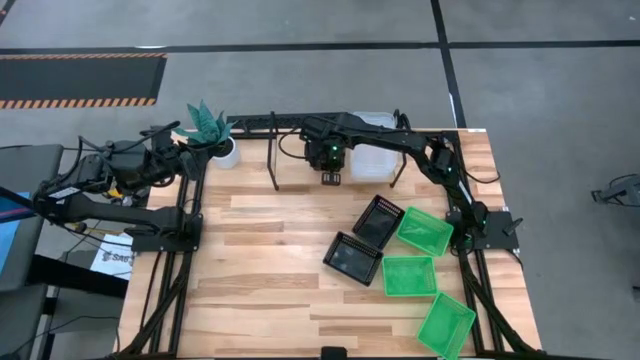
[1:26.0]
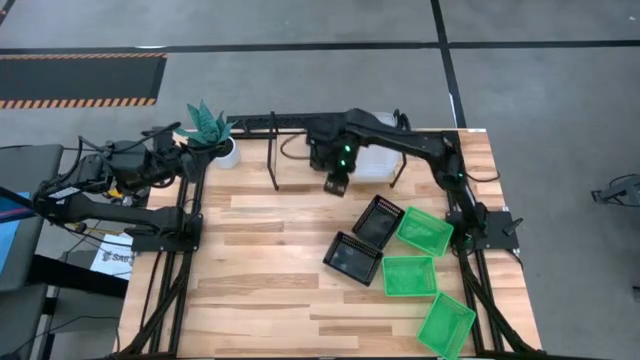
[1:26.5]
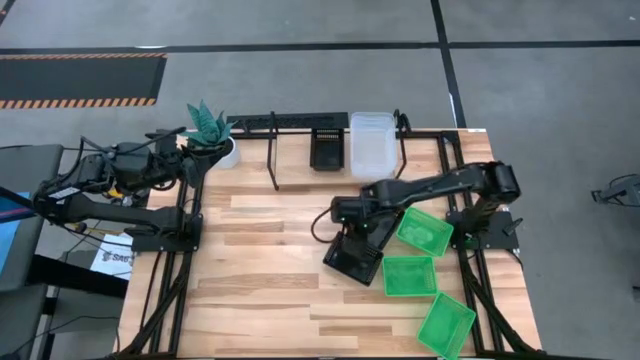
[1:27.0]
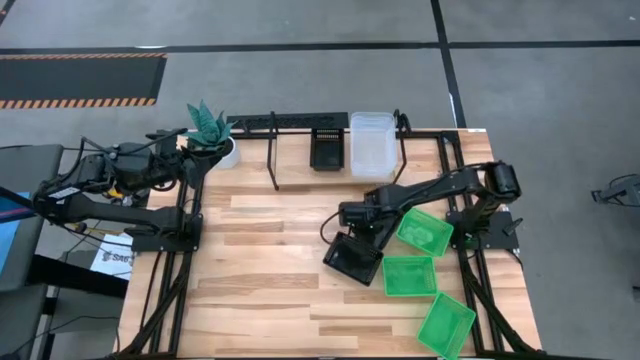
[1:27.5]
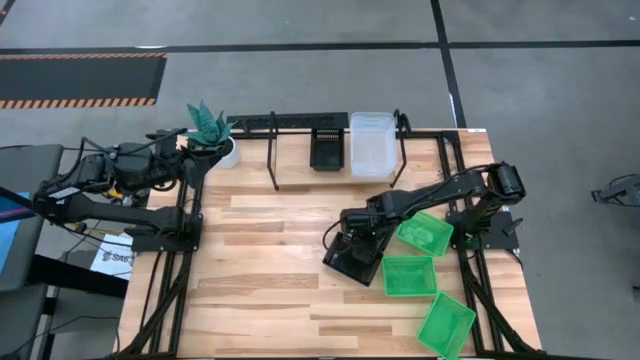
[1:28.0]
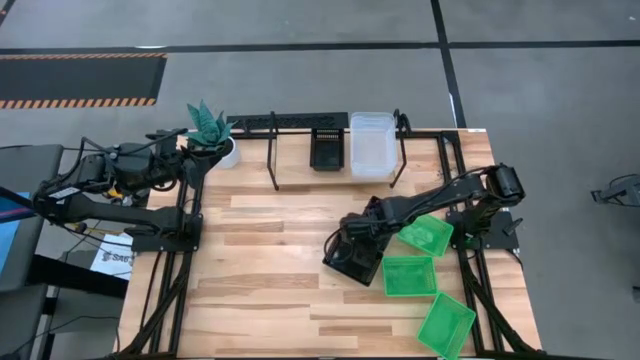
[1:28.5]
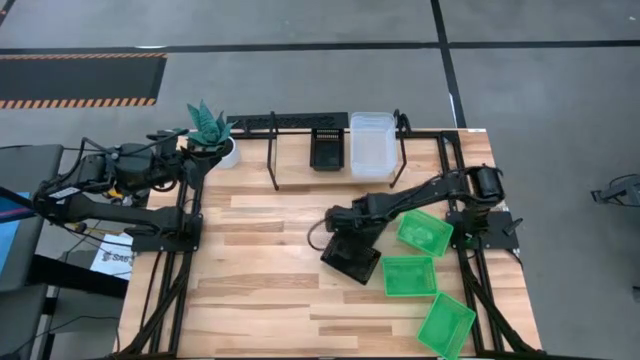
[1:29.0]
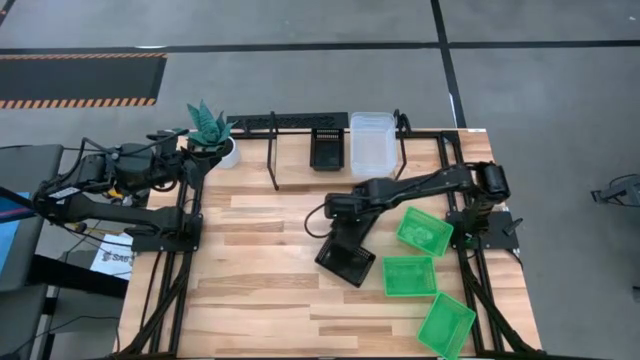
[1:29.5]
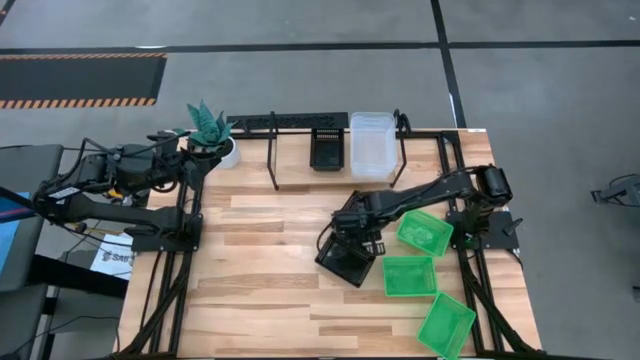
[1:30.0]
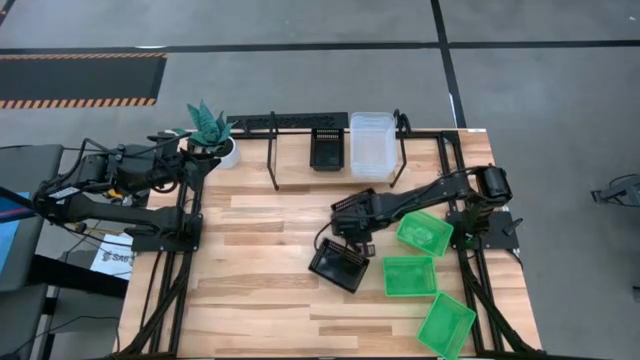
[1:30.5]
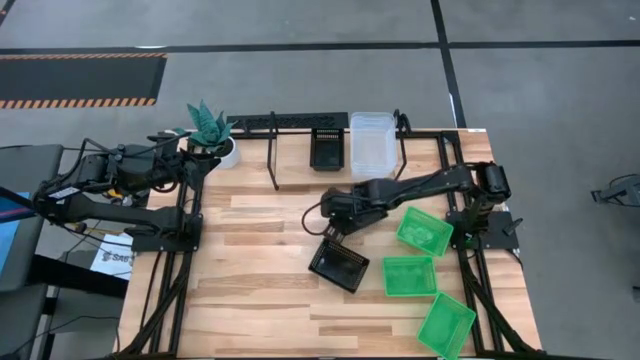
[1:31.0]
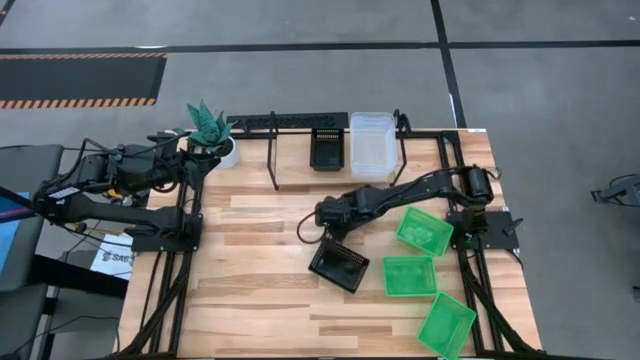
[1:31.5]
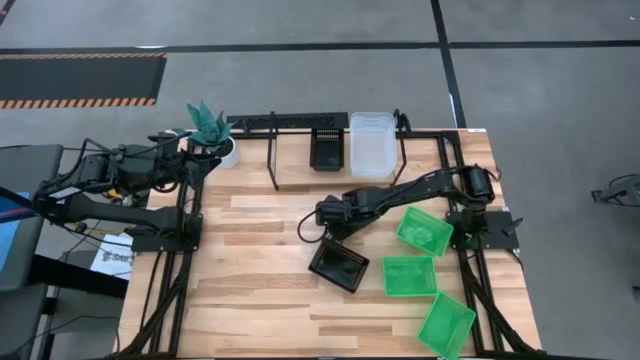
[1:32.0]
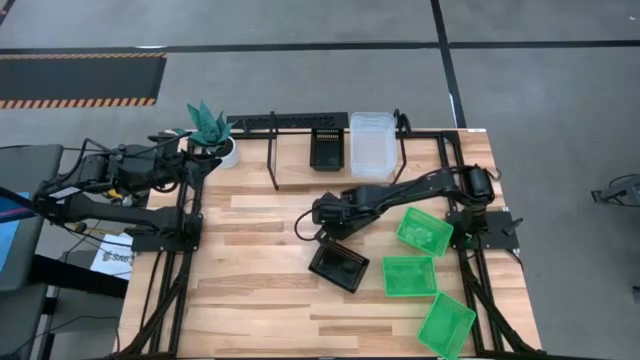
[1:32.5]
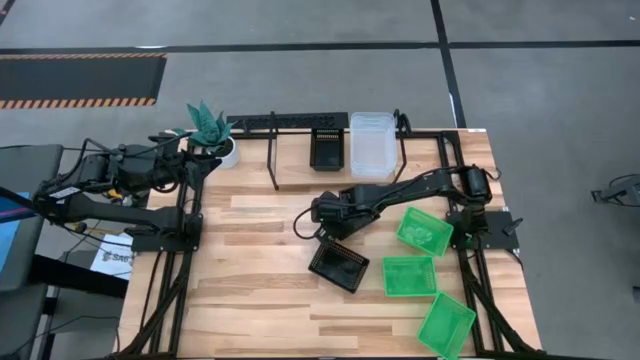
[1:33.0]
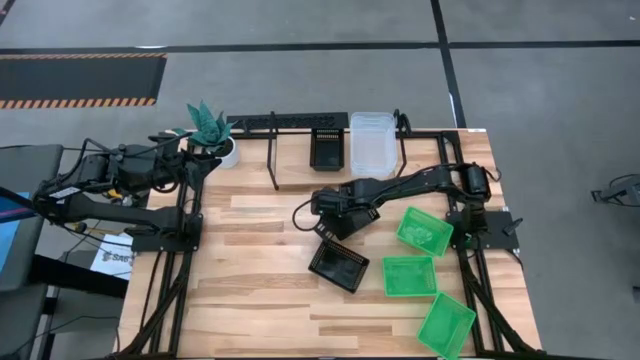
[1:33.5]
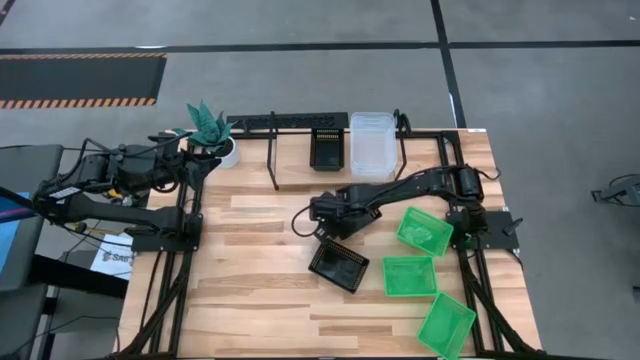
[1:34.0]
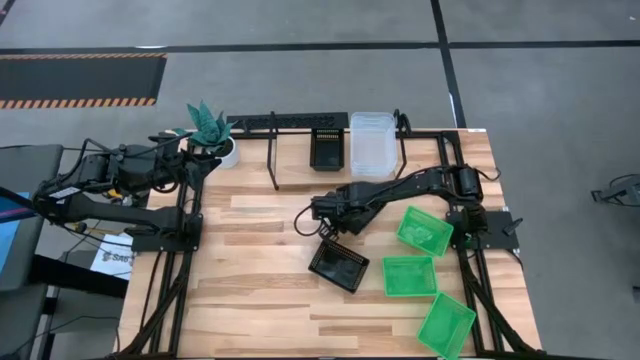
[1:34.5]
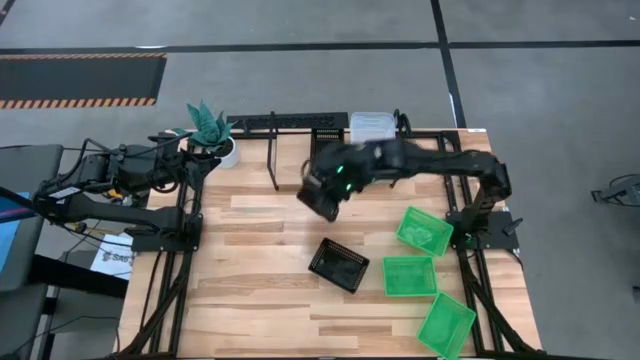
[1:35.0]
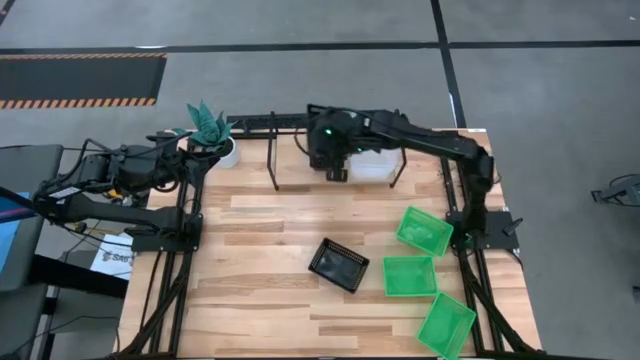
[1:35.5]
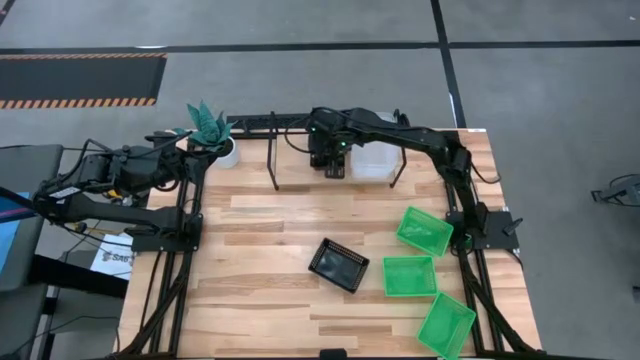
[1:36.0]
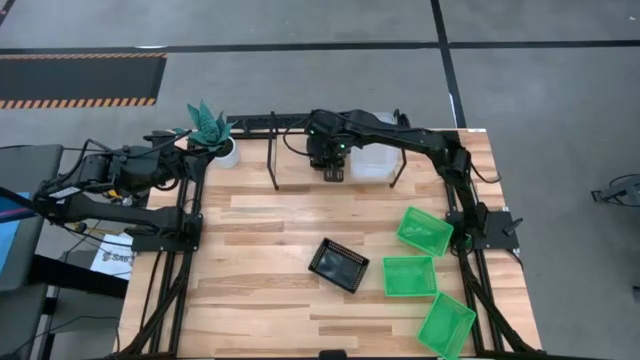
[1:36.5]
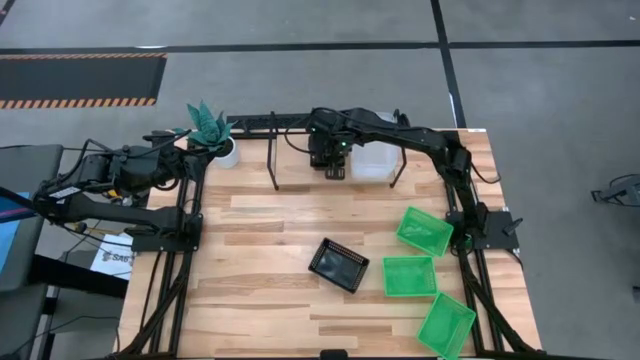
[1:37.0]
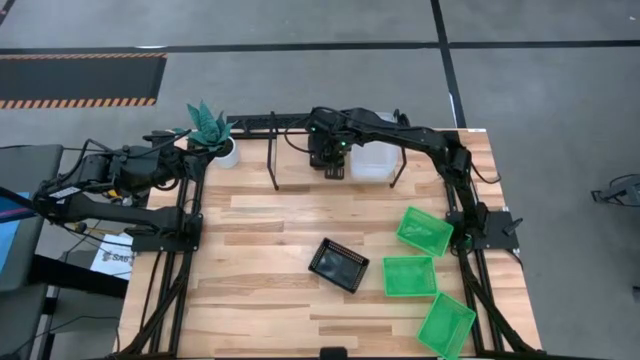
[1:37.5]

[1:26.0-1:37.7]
Task: Stack baskets on shelf by color
Stack the top black bin on top of the black bin on the shelf

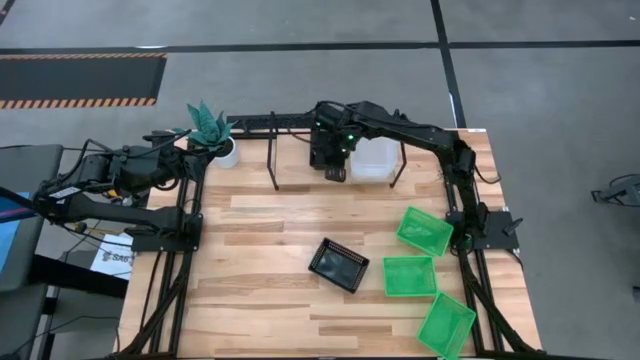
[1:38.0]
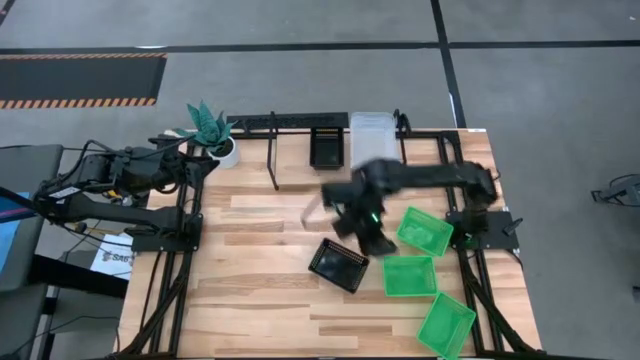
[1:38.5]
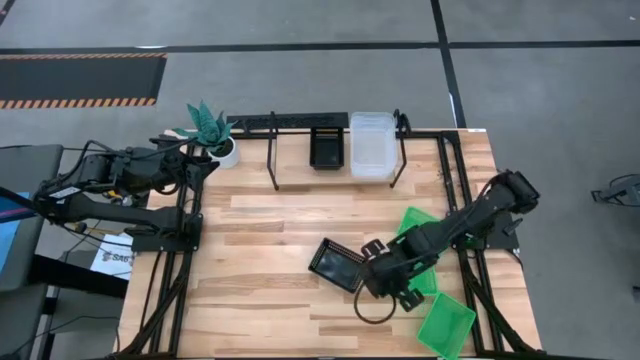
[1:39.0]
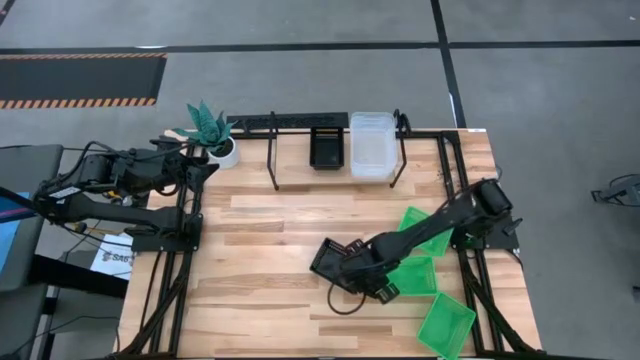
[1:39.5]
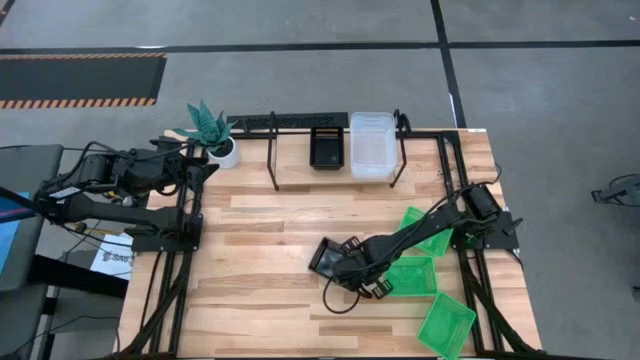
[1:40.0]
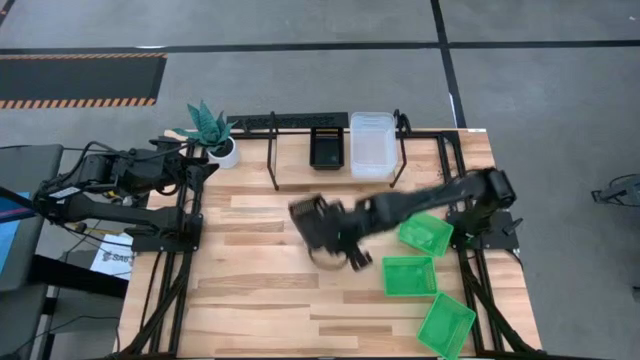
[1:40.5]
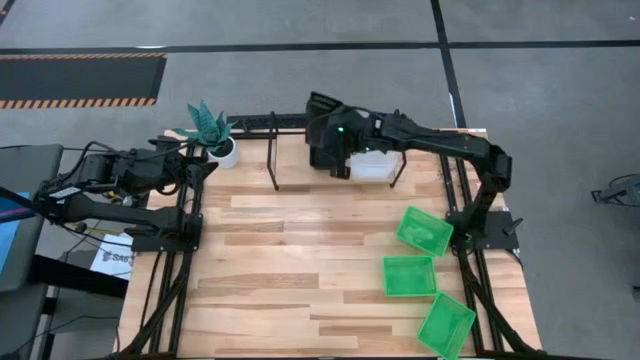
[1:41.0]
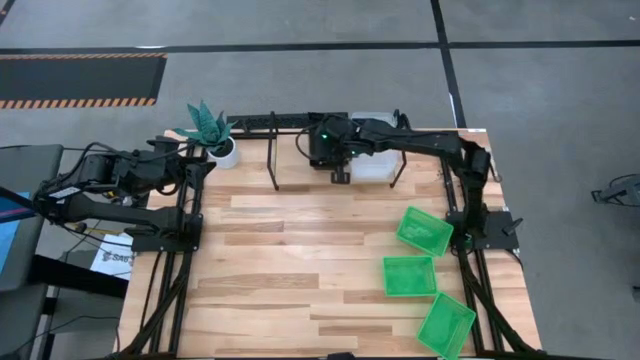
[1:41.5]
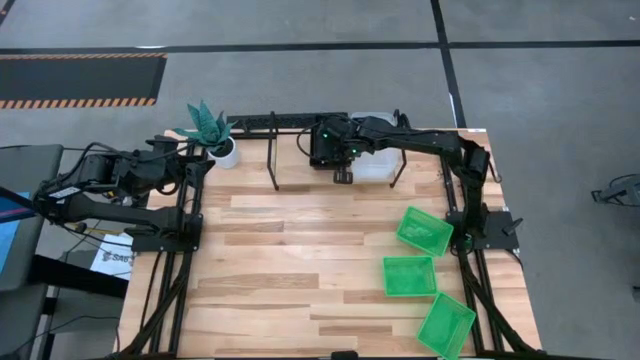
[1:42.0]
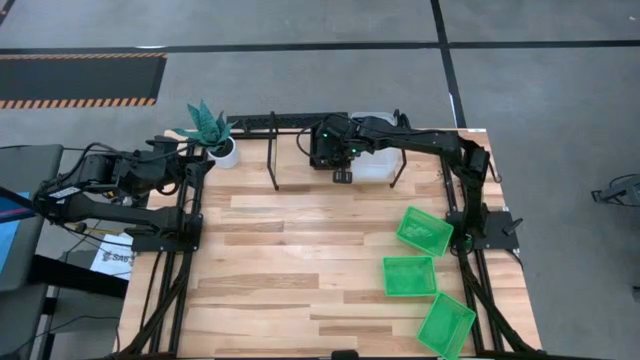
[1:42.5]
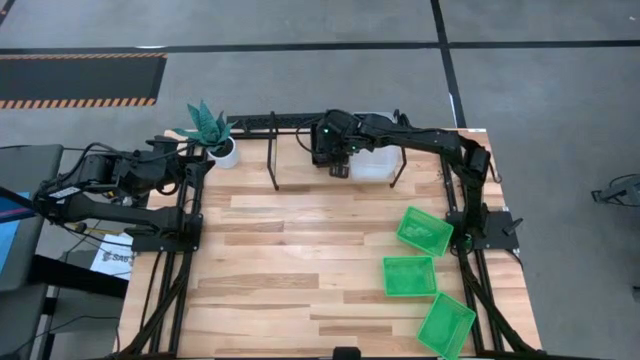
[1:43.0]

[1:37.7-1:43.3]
Stack the black bin on top of the stacked black bins on the shelf

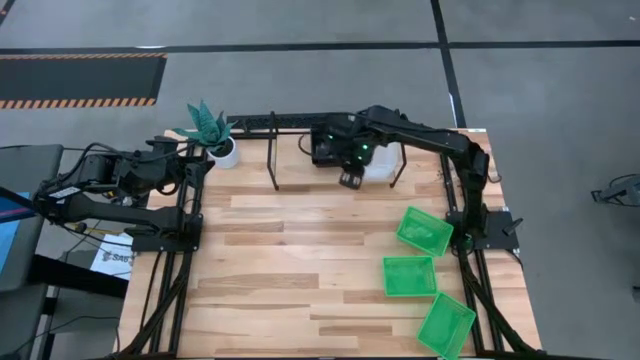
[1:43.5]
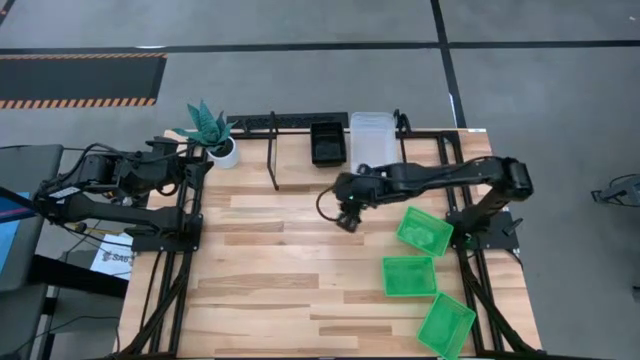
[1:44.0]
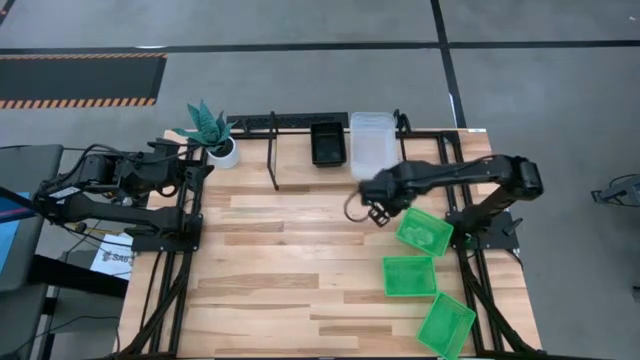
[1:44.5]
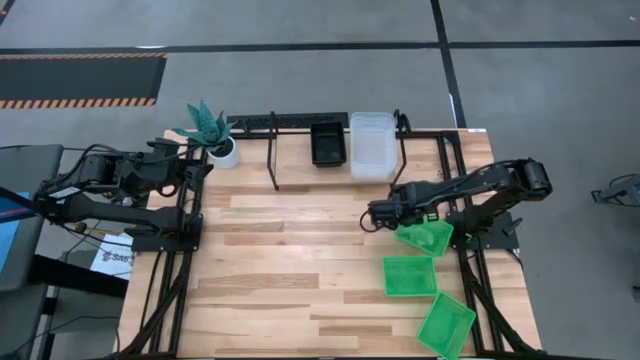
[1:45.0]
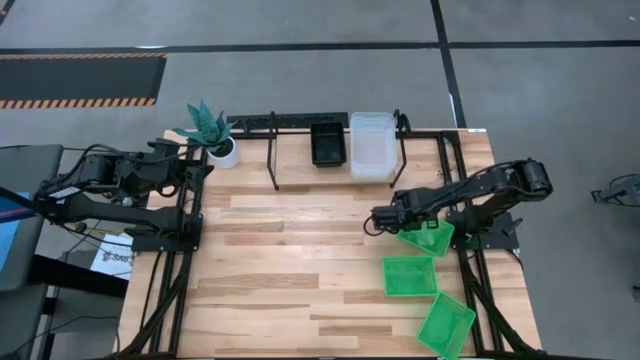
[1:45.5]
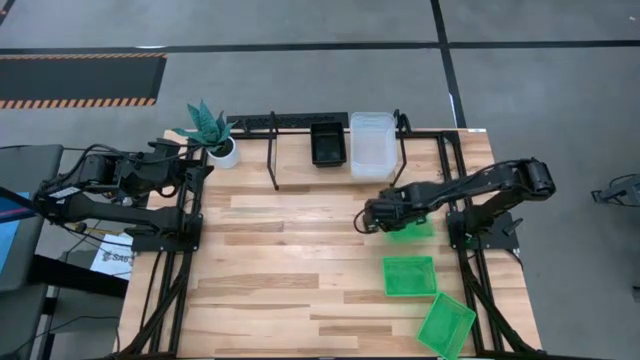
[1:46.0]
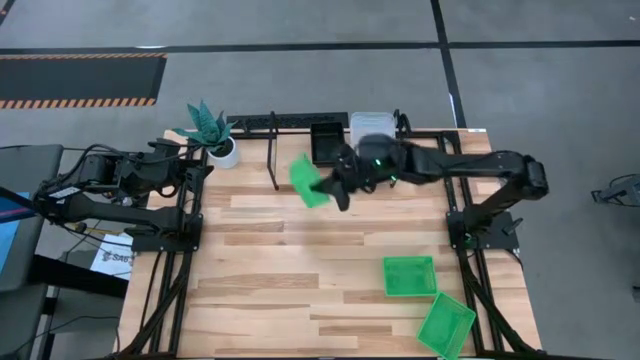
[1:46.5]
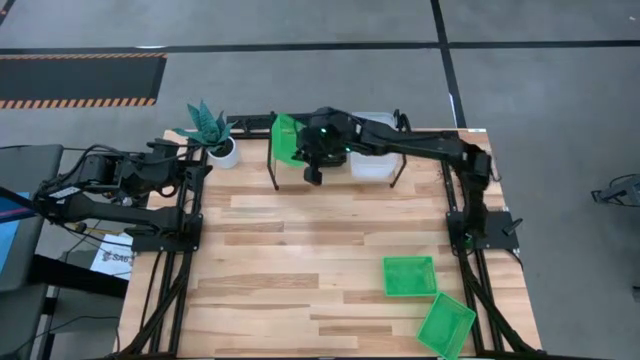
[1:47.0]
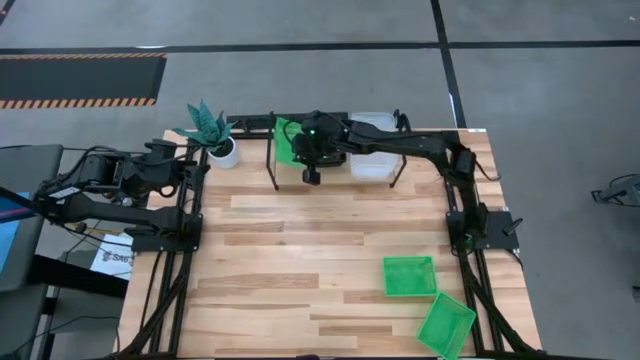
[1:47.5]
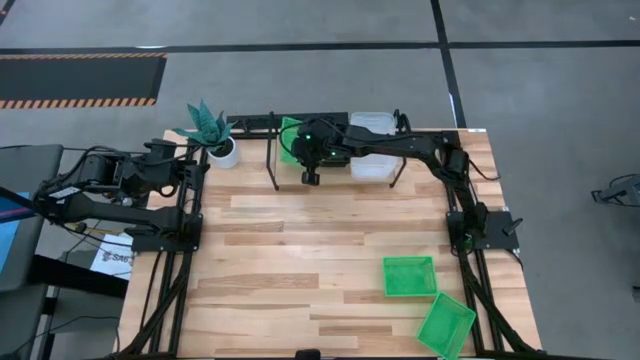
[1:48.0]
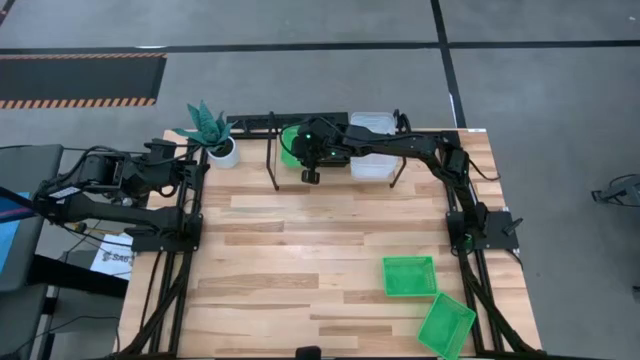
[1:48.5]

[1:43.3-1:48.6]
Put the top green bin on the shelf
